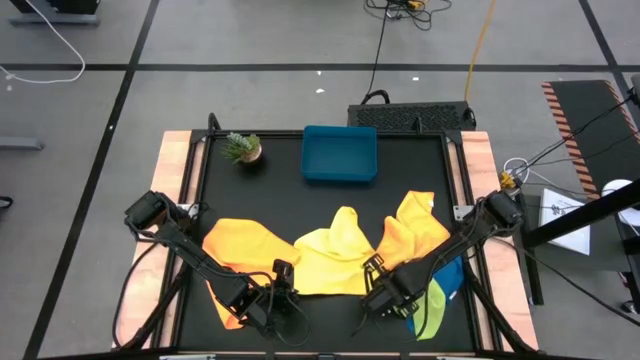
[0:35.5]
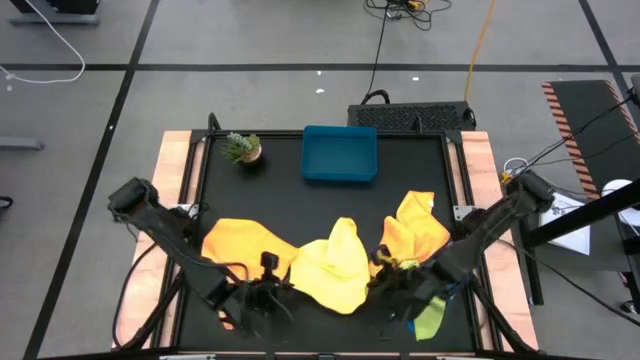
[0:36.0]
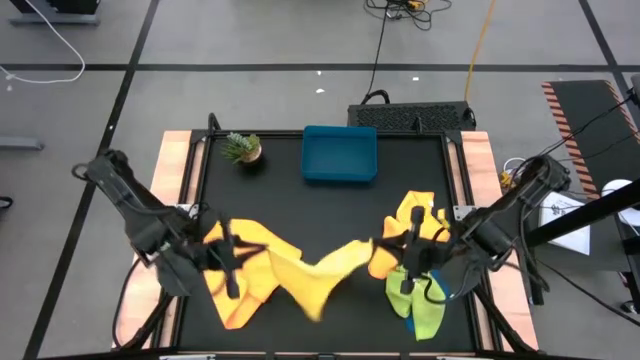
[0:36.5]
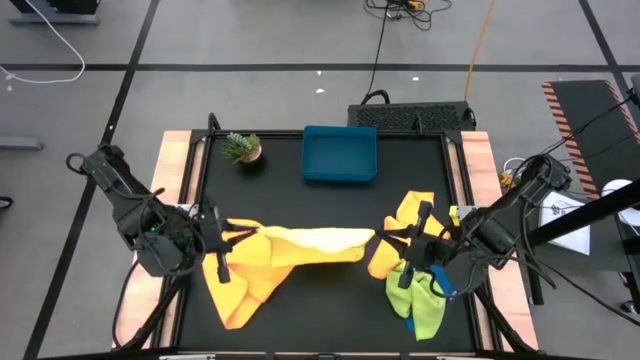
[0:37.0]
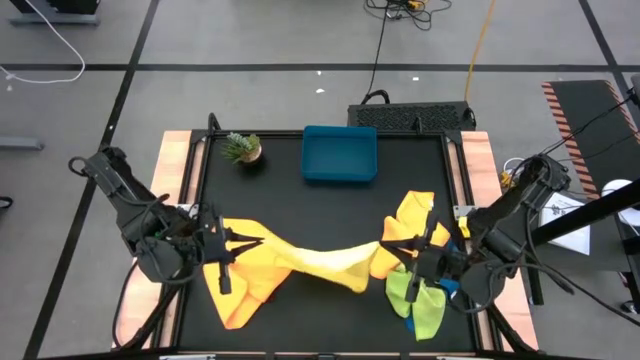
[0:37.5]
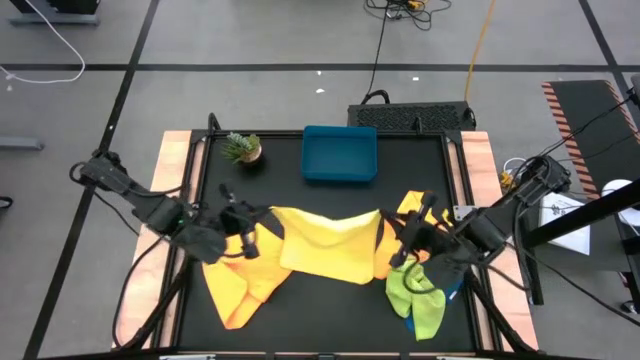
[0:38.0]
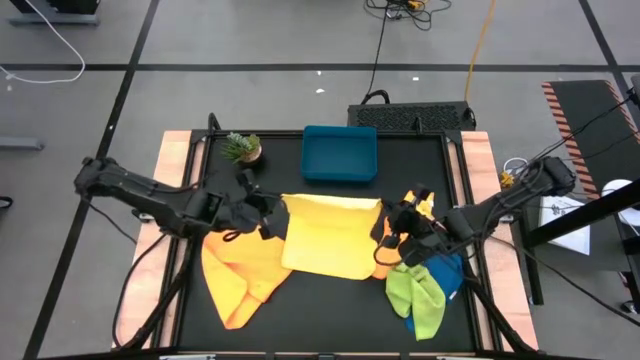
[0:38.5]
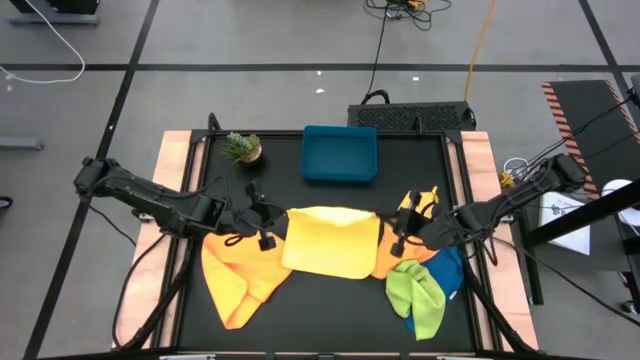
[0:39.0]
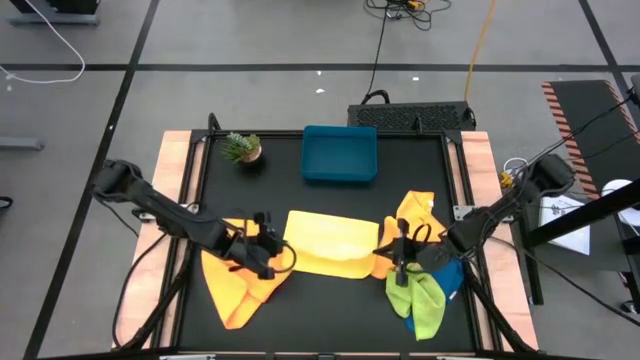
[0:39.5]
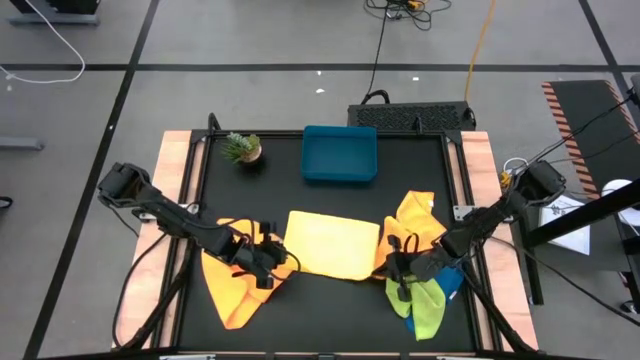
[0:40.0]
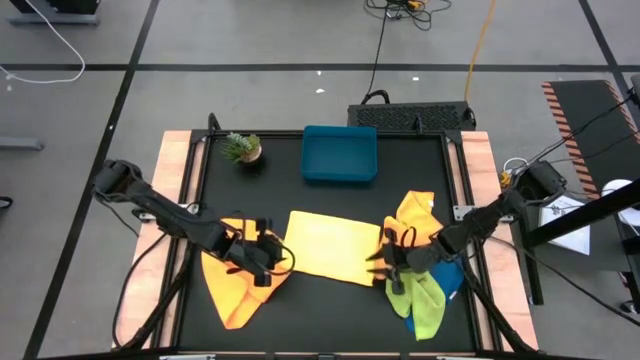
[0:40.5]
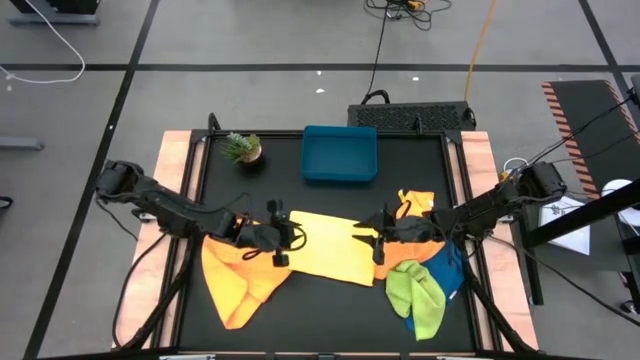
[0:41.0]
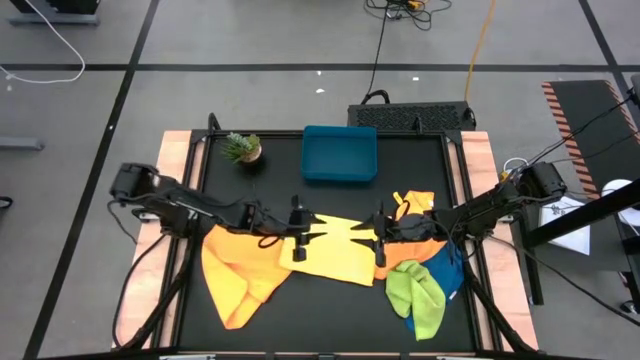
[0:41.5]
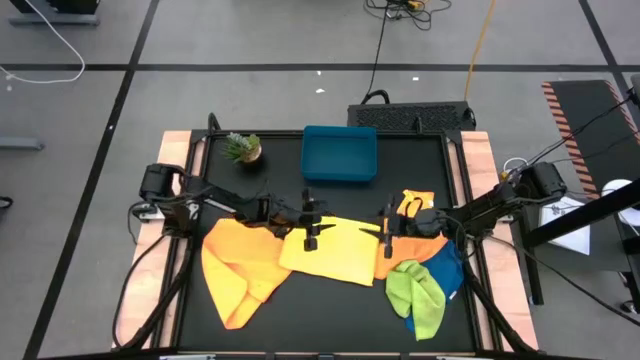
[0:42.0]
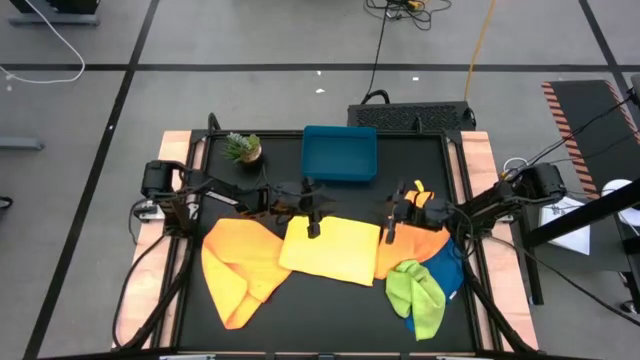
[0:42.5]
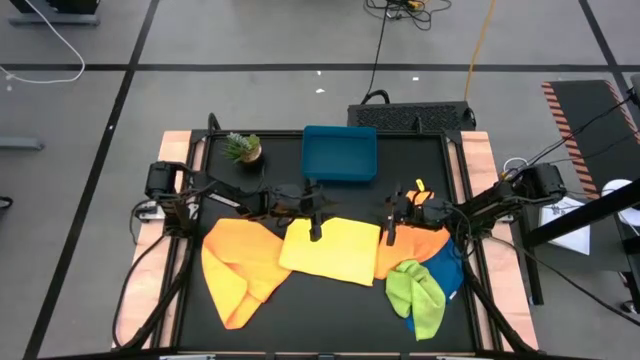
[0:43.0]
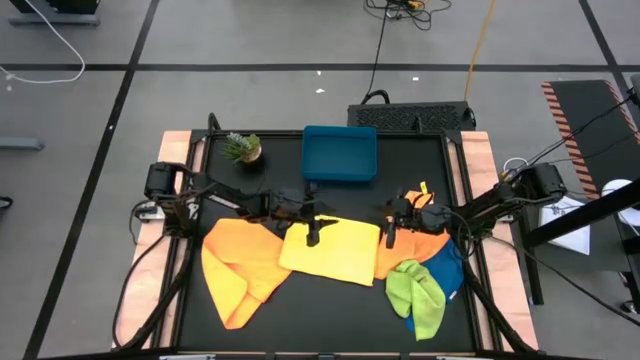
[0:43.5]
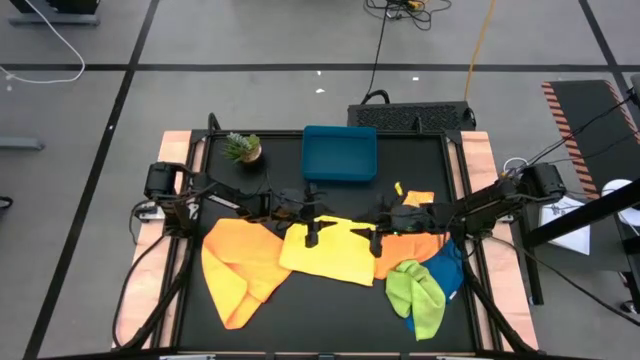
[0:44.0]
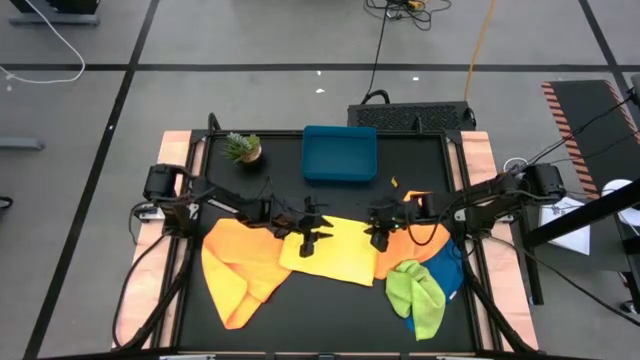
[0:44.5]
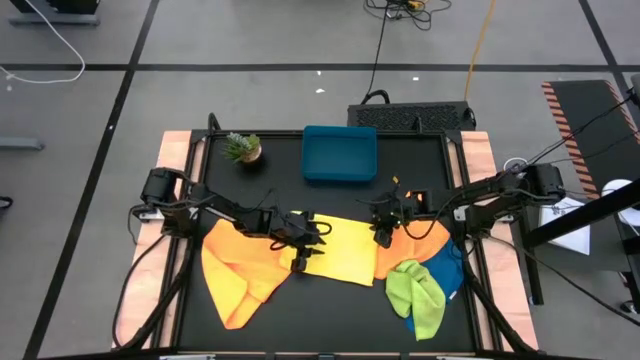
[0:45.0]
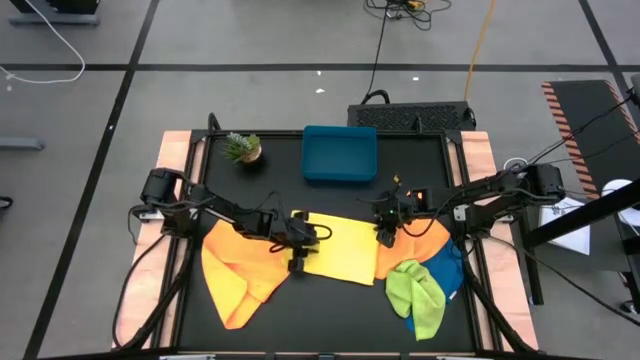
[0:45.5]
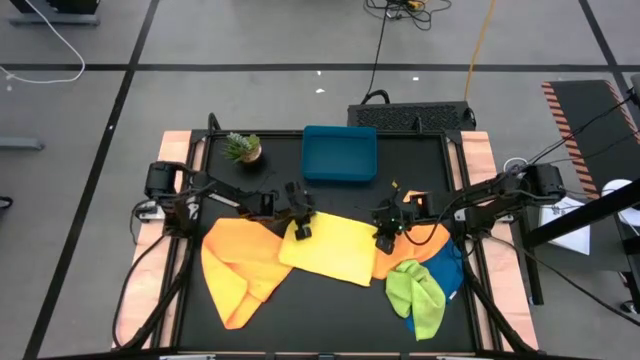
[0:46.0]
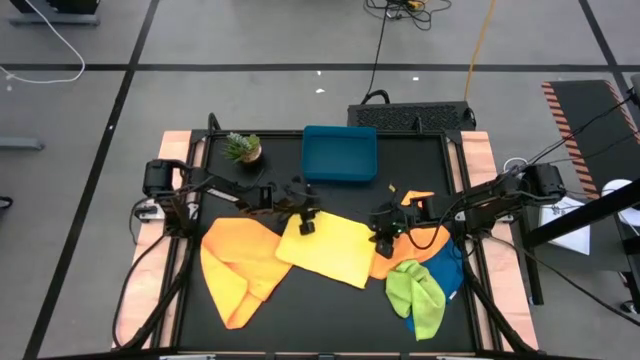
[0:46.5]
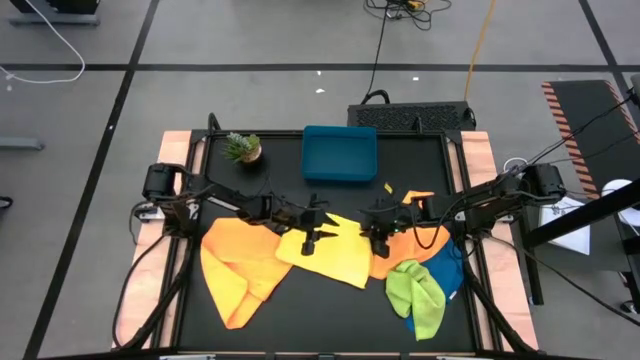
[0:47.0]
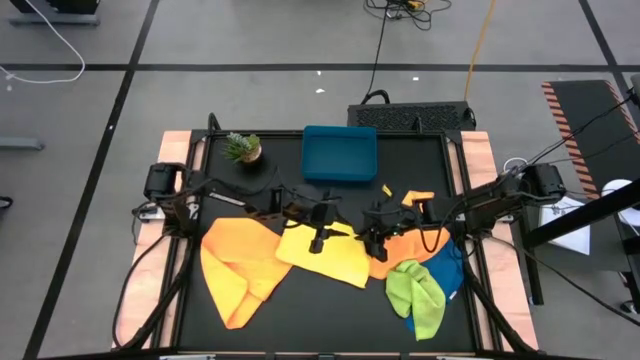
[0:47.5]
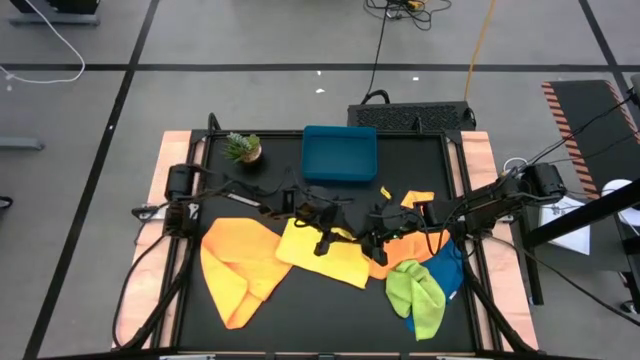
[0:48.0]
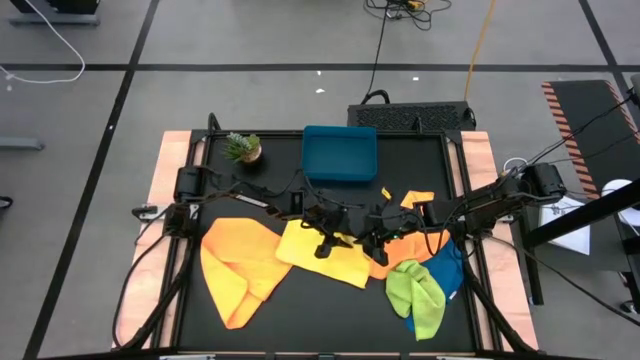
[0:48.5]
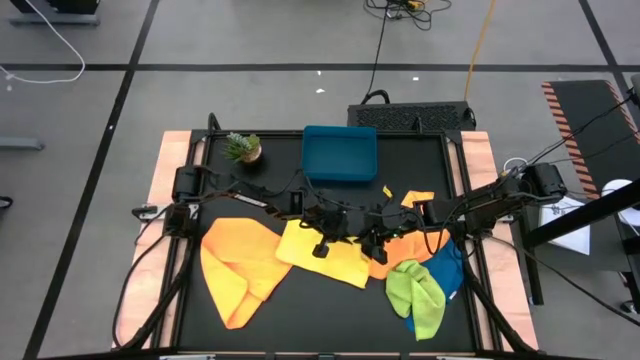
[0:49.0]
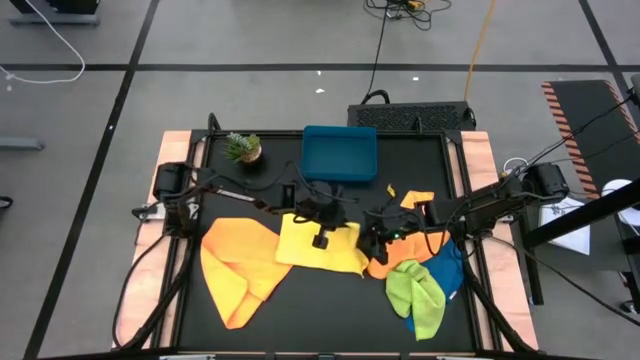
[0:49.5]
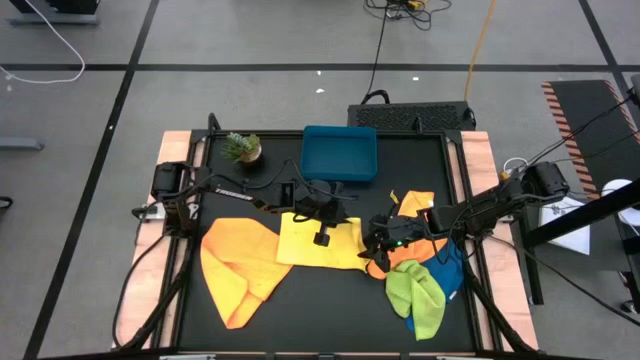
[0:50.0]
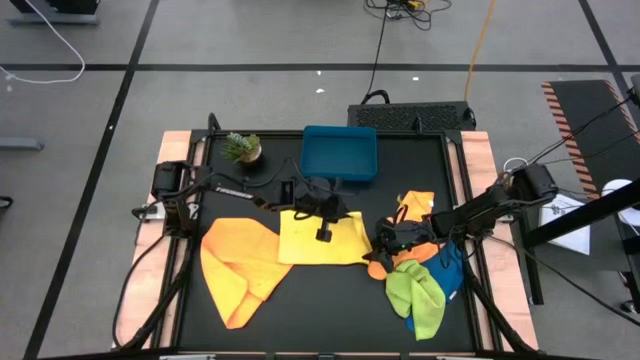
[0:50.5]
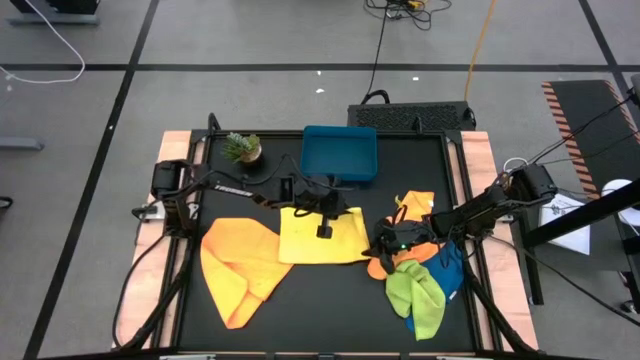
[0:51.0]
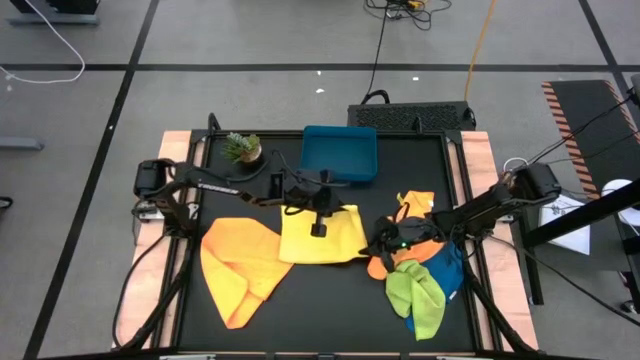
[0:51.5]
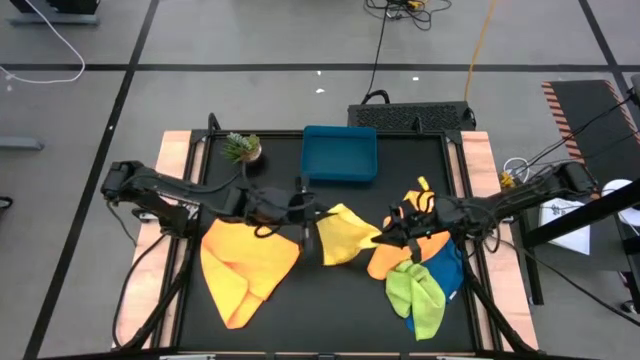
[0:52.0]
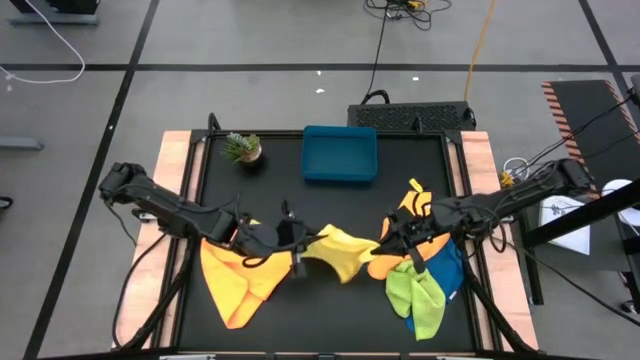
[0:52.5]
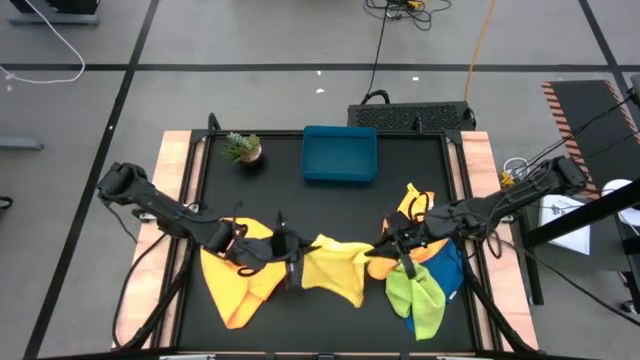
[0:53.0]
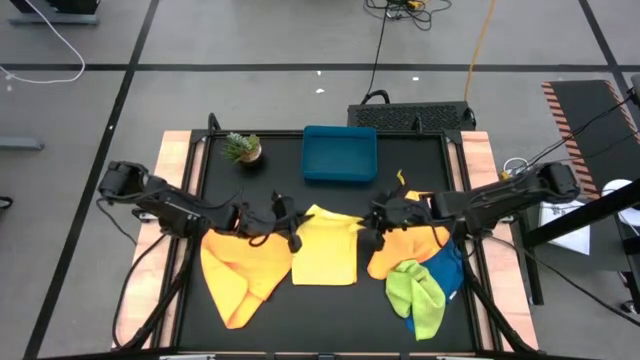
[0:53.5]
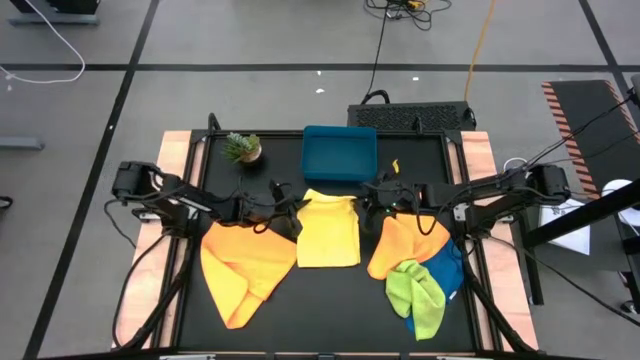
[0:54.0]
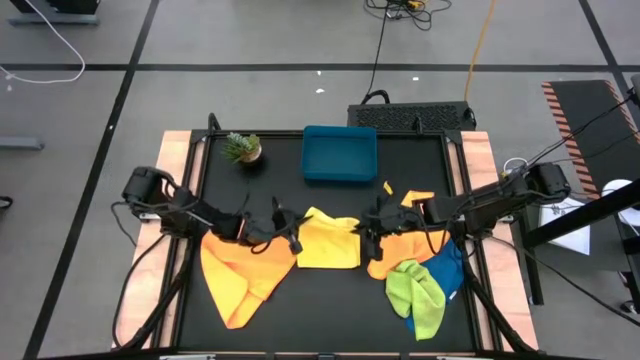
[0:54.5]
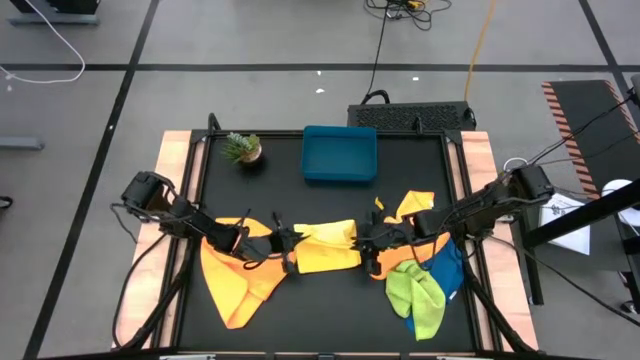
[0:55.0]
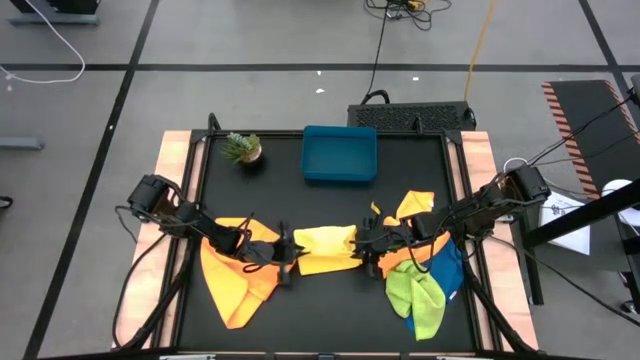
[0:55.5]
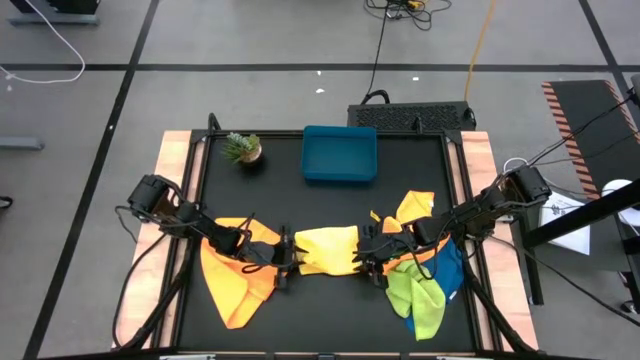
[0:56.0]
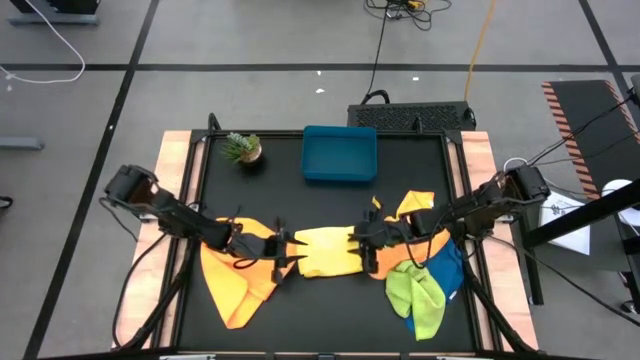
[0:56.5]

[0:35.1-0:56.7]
Task: Fold microfiber towels
Fold the yellow microfiber cloth
